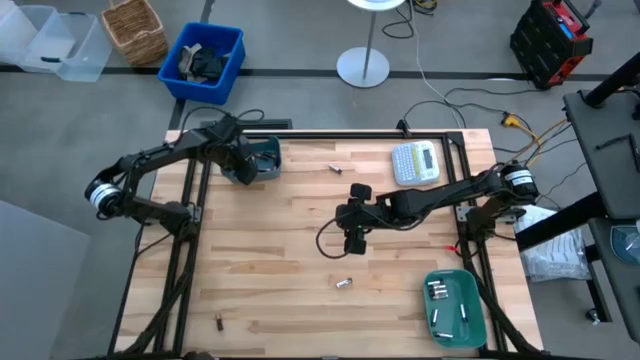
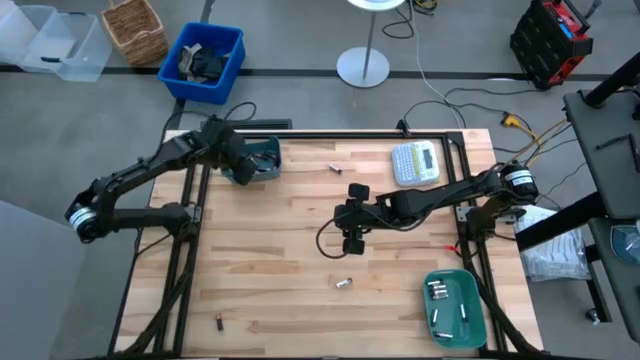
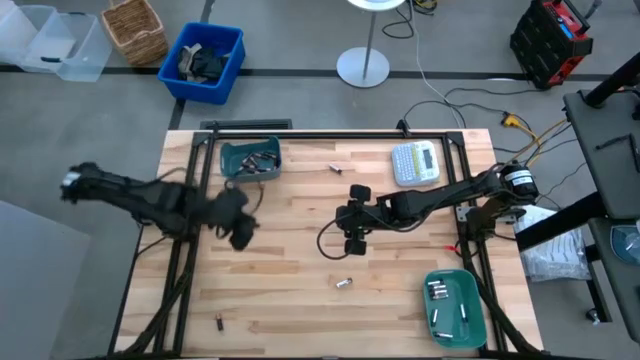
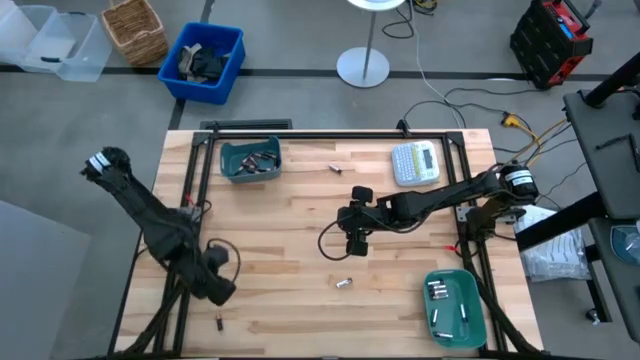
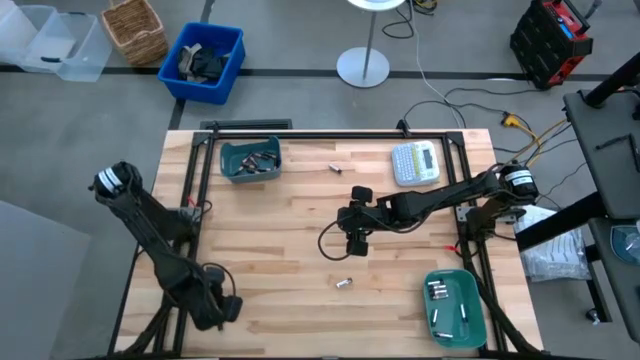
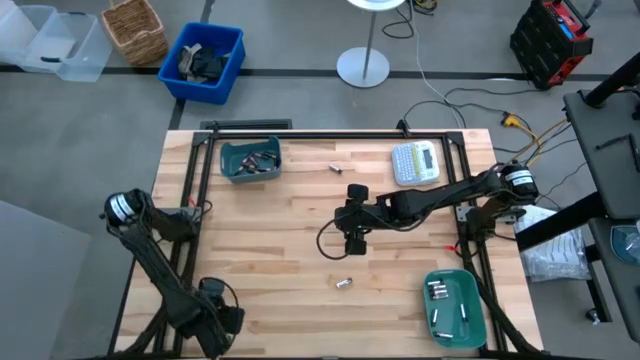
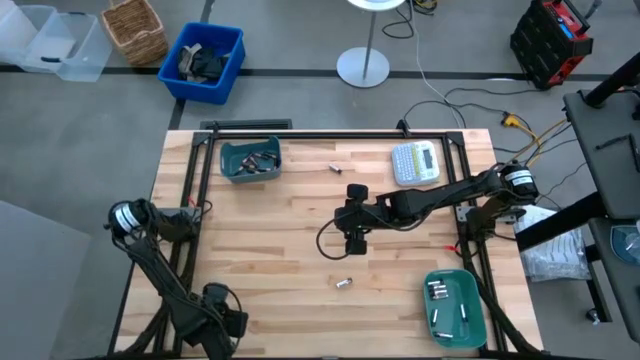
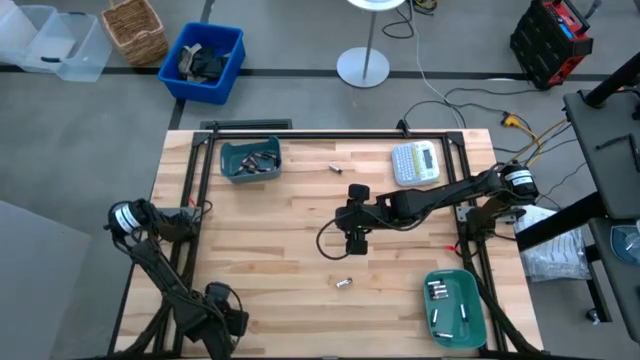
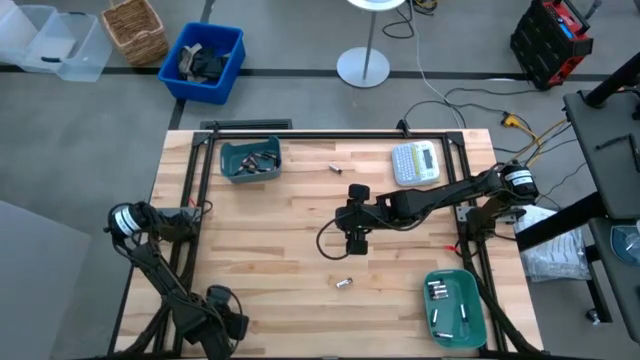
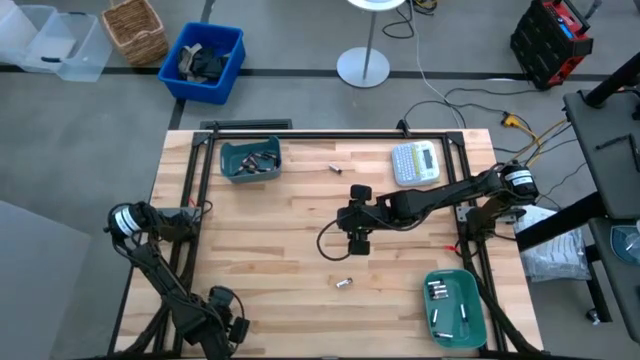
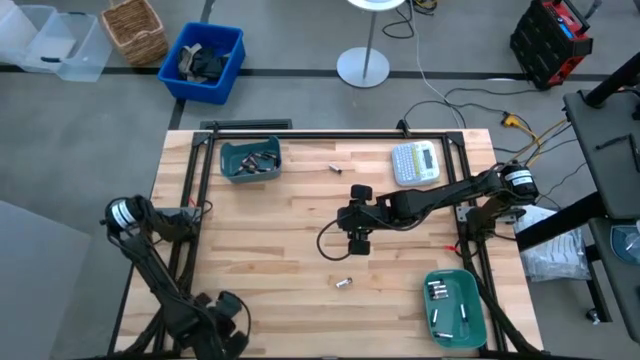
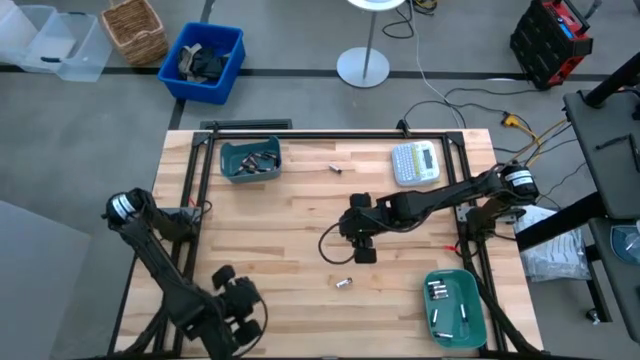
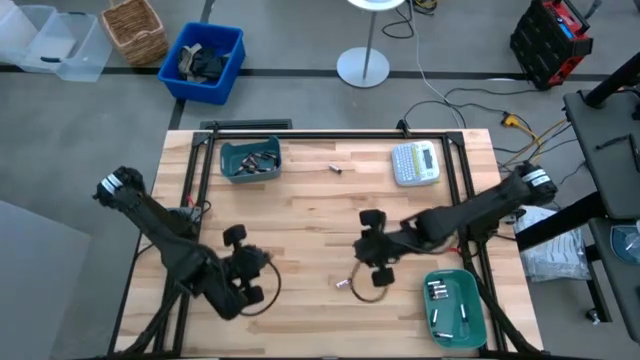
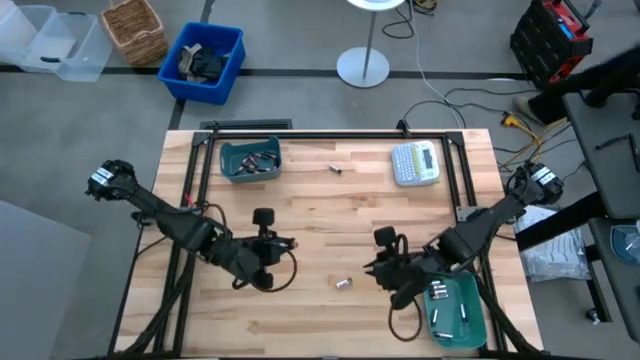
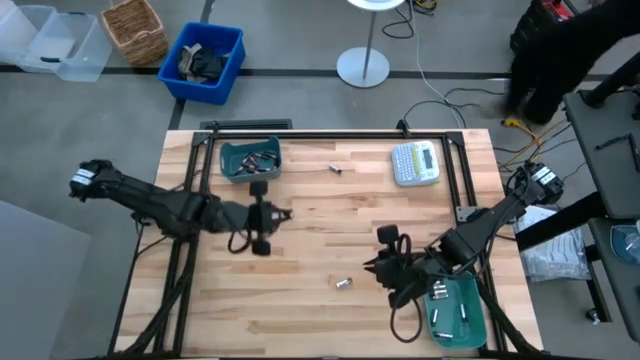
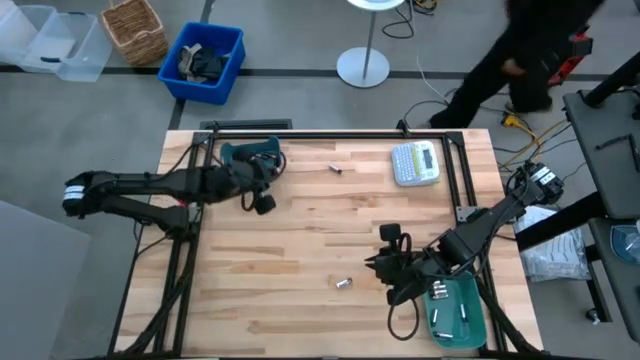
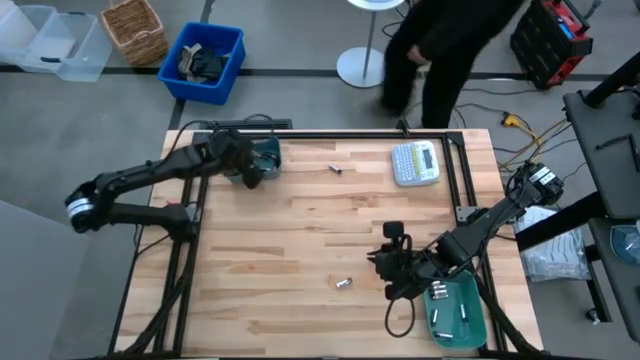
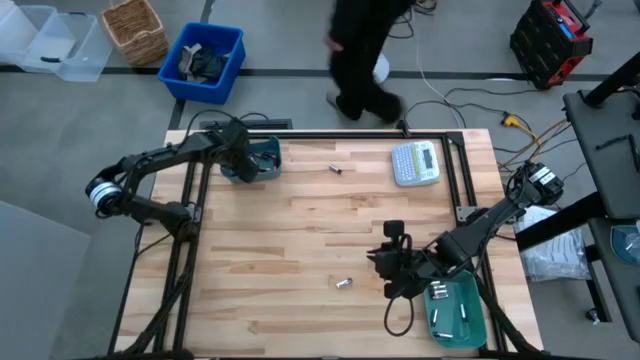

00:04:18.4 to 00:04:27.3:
Task: Sort batteries
Put the black battery into the blue bin

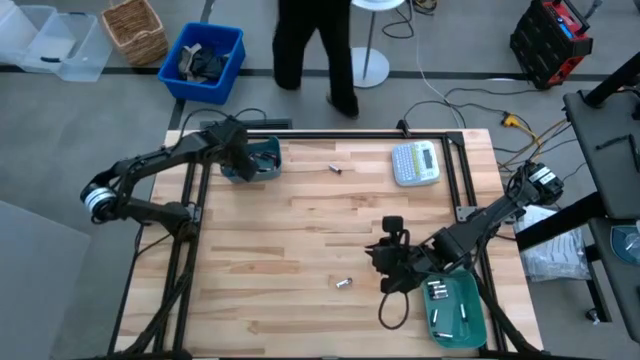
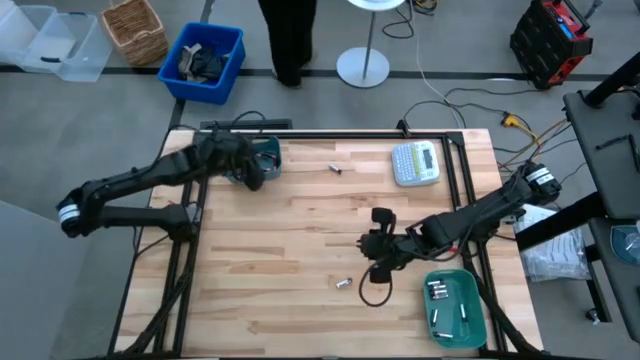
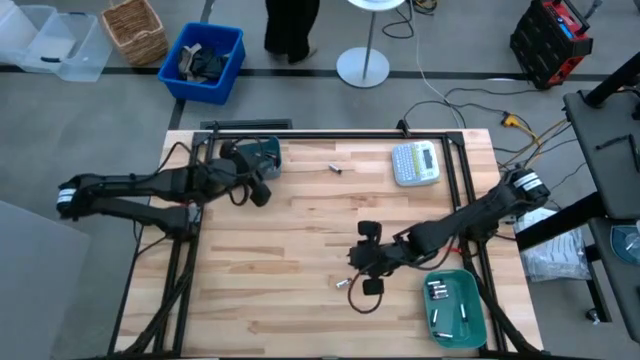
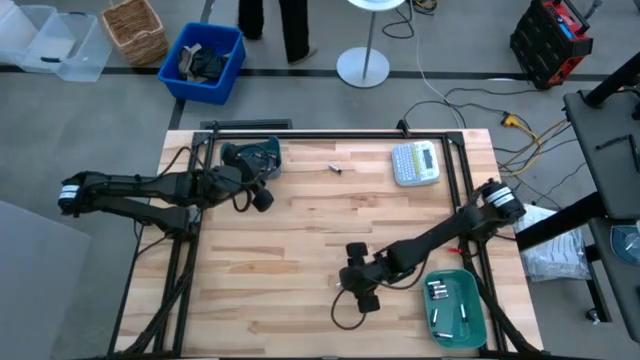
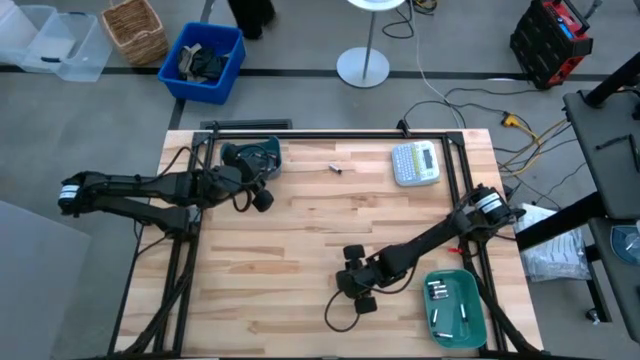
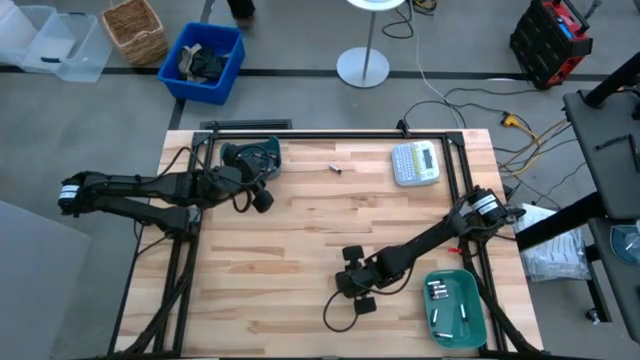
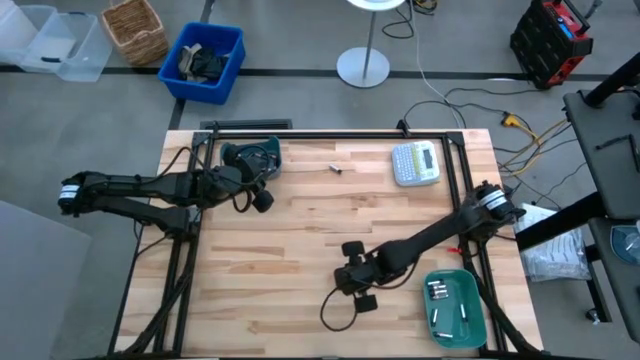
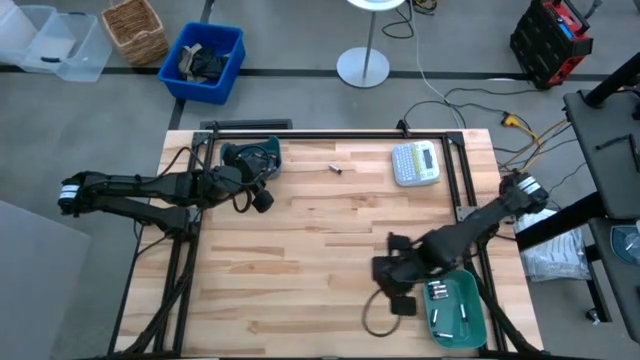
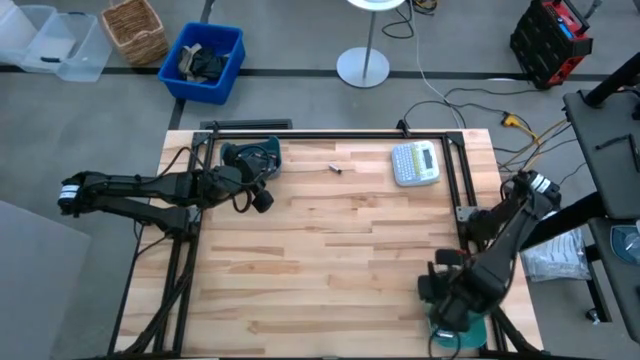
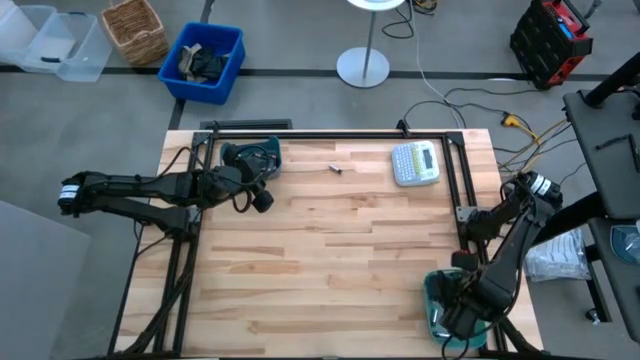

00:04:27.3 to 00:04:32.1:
Put the silver battery into the green bin

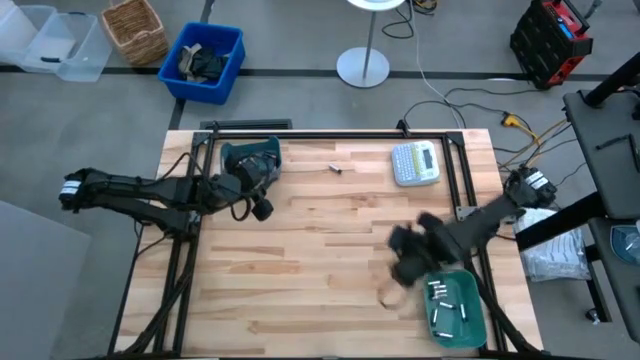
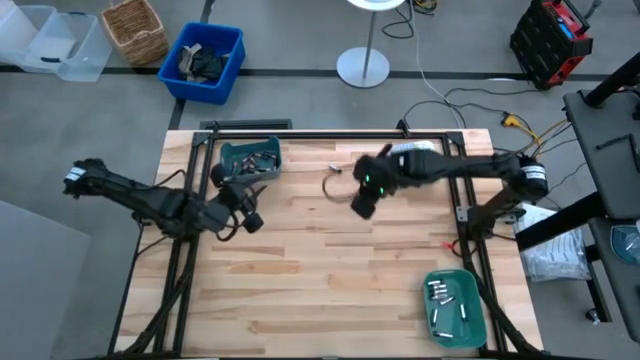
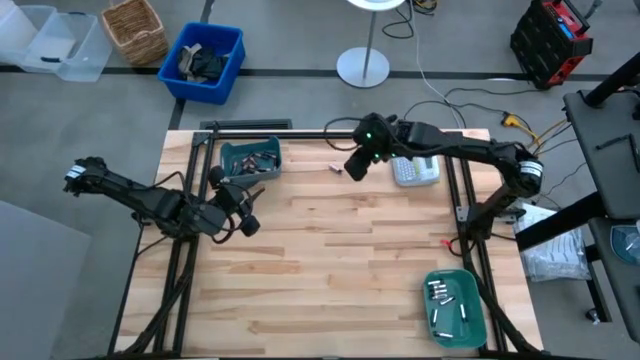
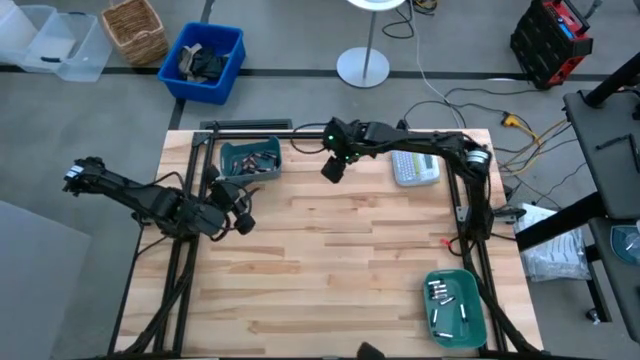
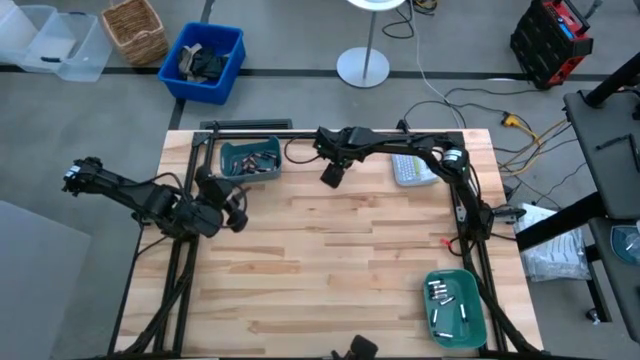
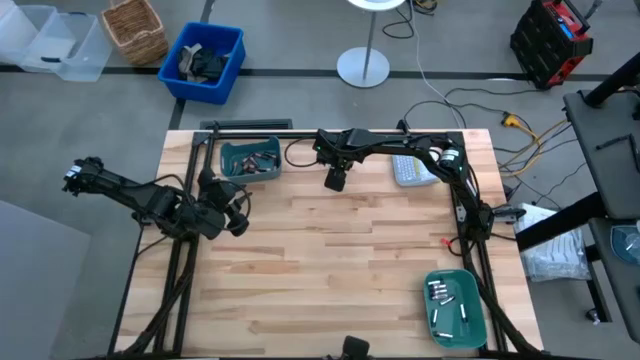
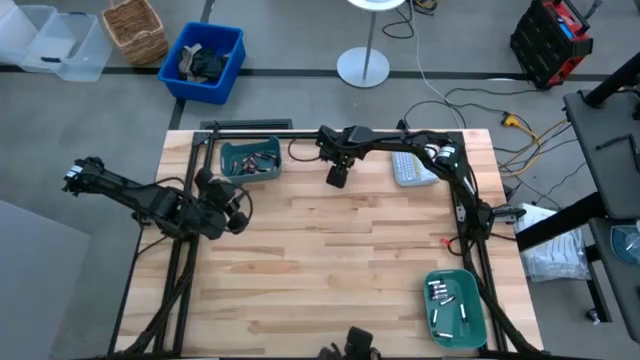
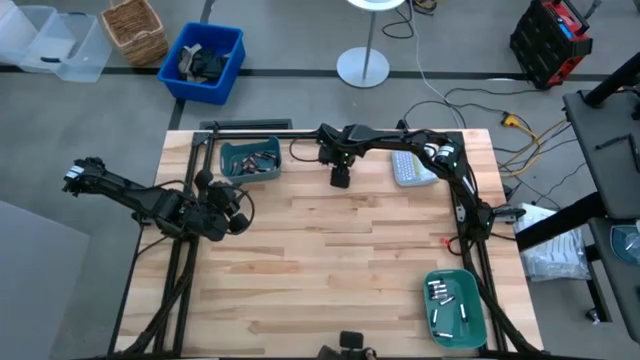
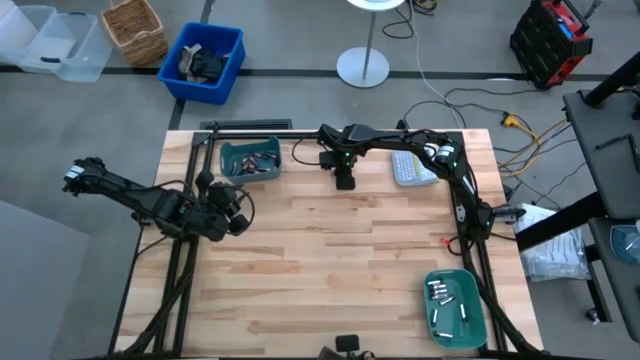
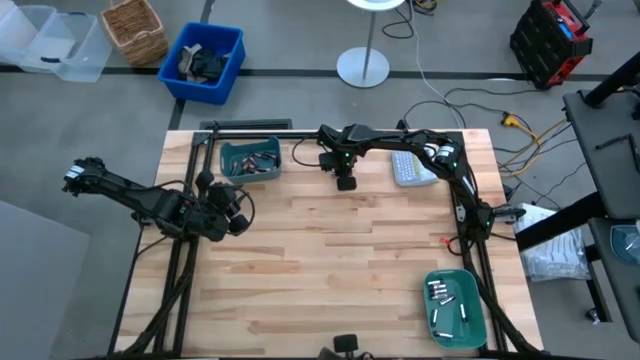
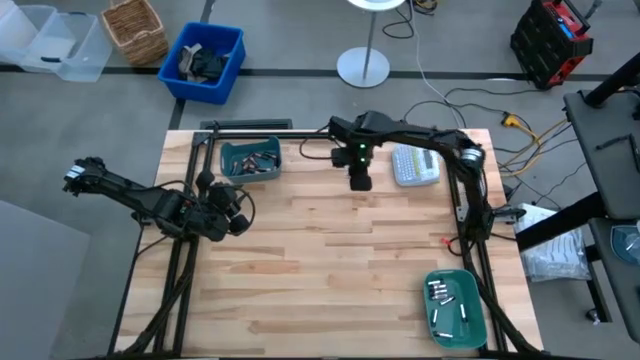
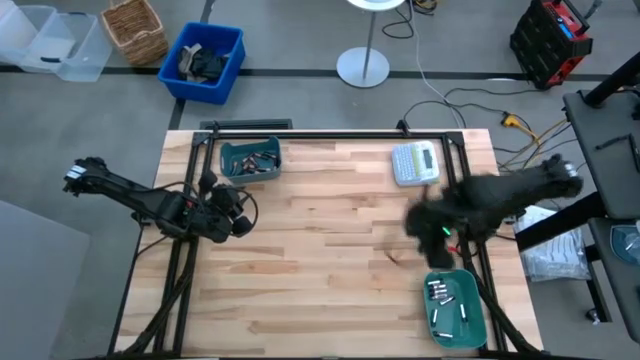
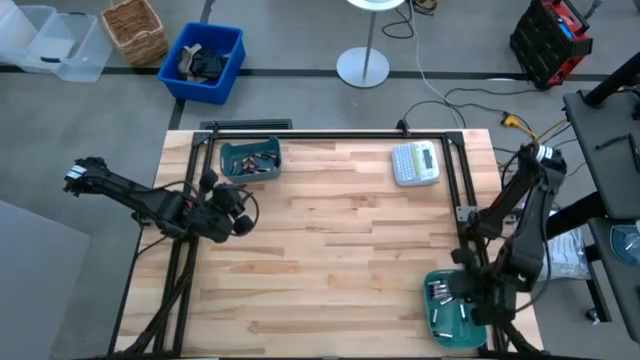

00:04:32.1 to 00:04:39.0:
Put the silver battery into the green bin
